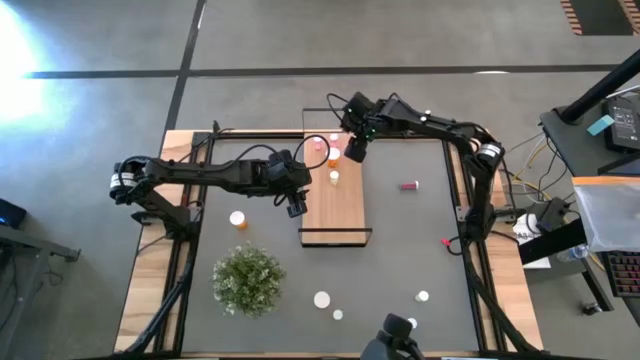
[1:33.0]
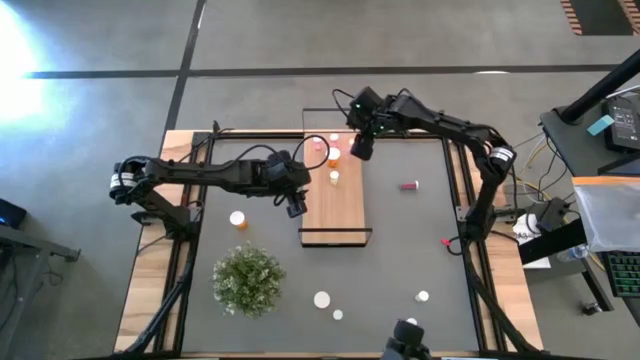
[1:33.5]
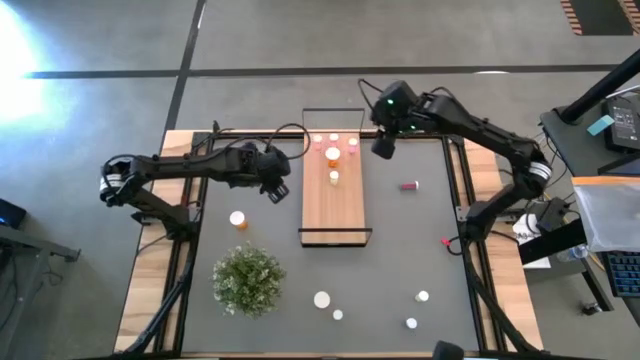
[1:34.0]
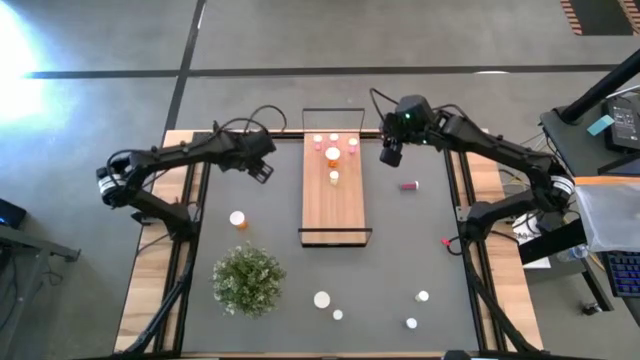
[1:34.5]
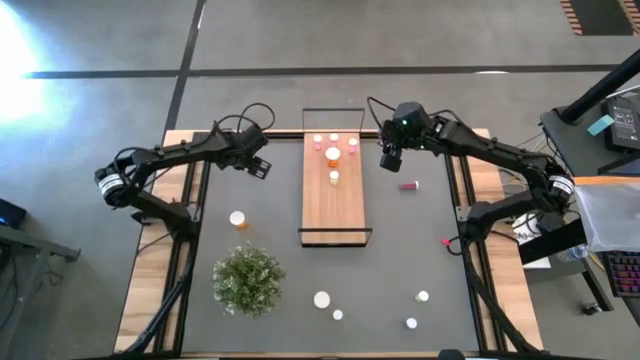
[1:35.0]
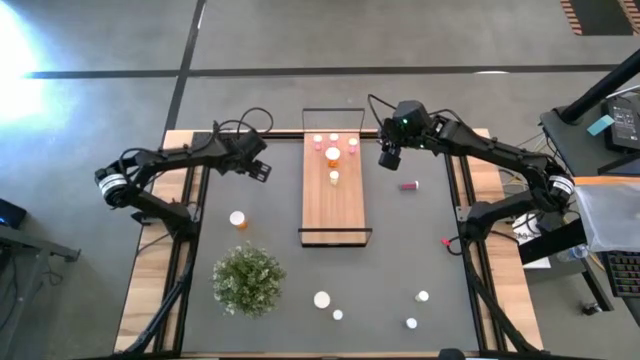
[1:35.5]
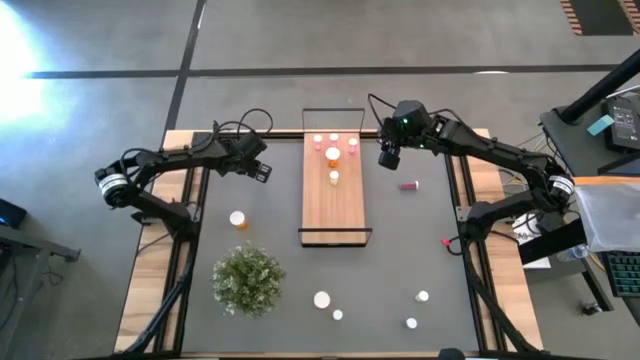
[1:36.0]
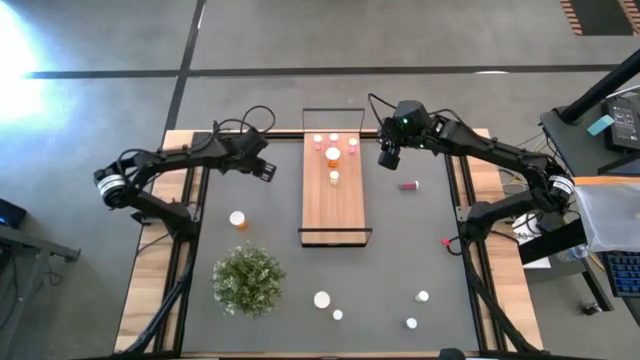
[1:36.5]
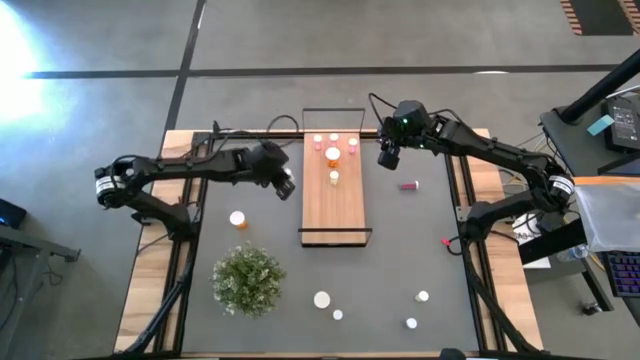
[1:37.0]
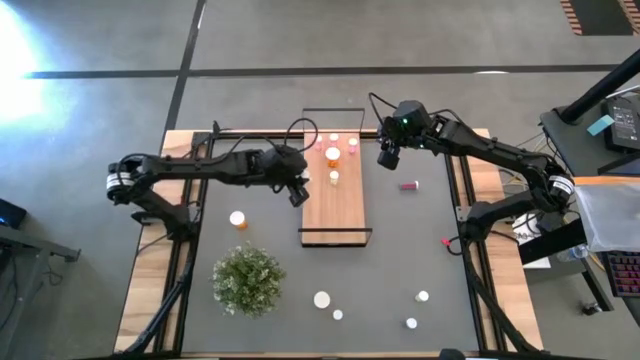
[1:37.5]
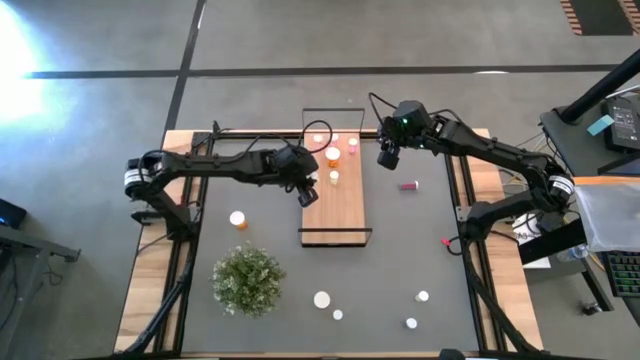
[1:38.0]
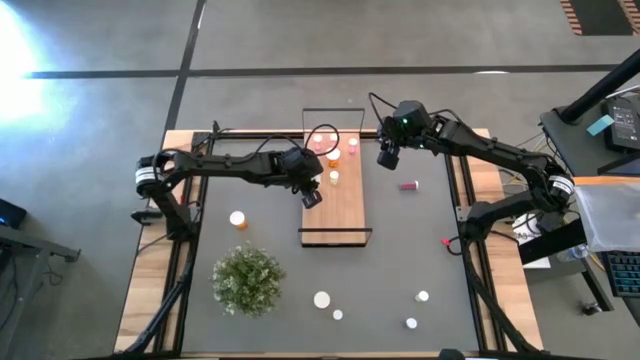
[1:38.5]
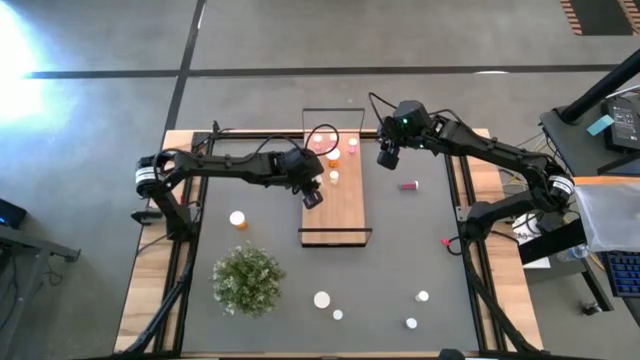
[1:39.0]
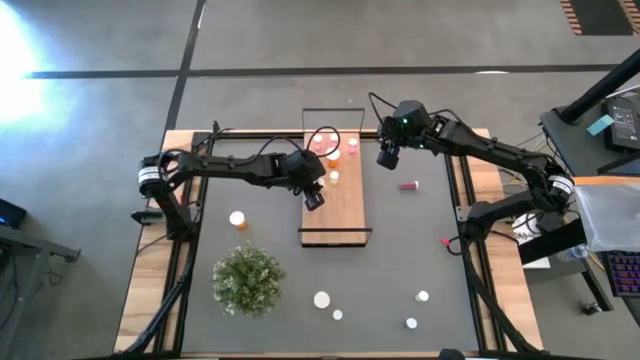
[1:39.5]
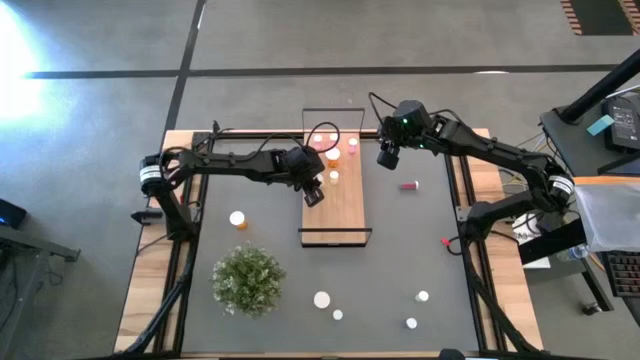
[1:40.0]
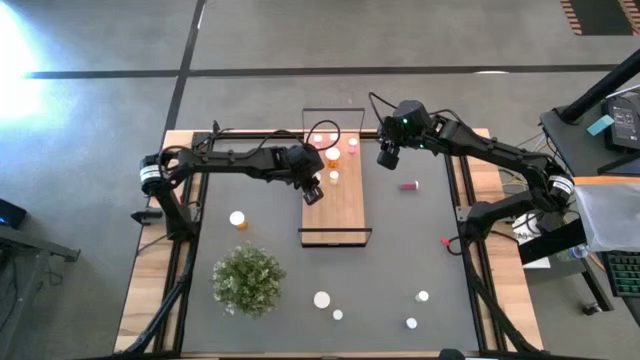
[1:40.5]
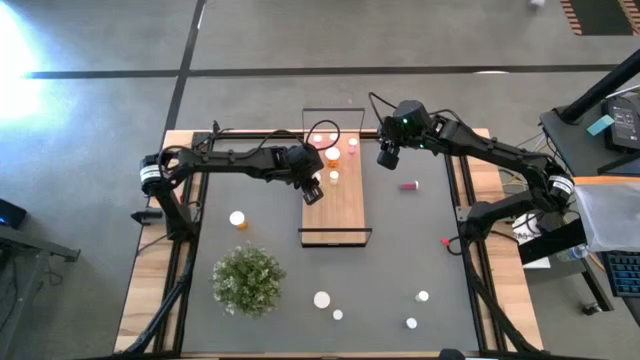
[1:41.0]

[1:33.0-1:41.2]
Task: Pick and place medicine bottles onto shelf by color
Put the top yellow pill bottle on the shelf aligned with the other yellow pill bottle

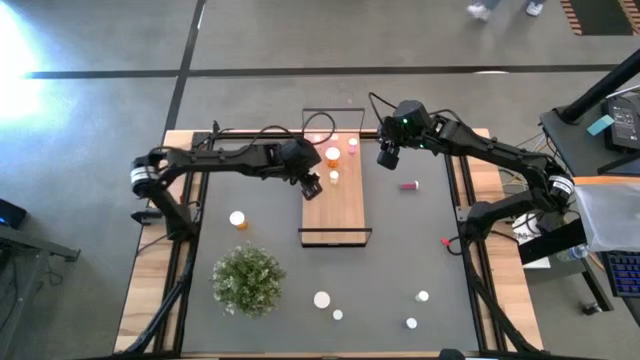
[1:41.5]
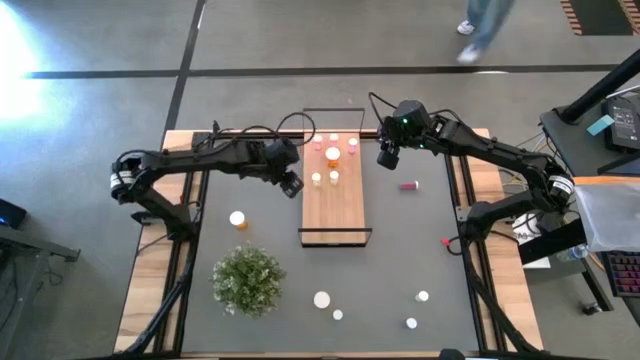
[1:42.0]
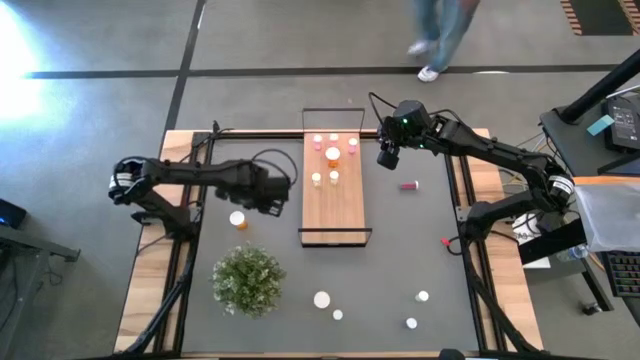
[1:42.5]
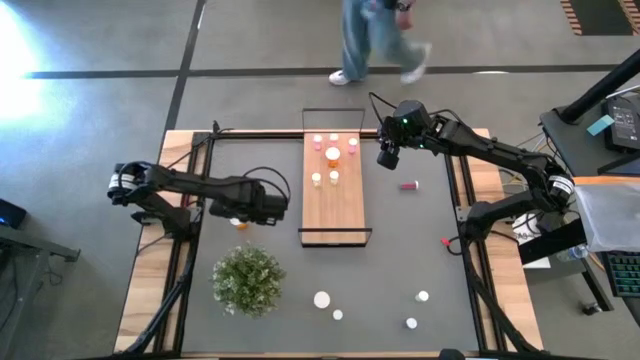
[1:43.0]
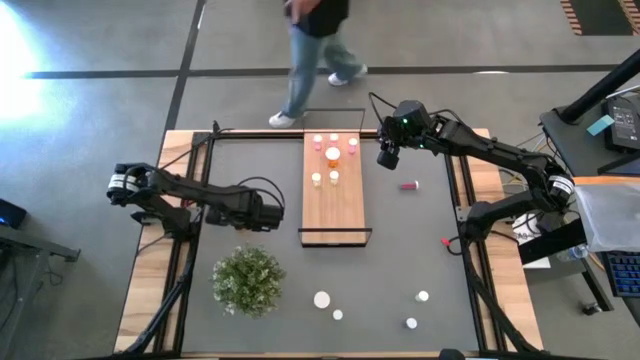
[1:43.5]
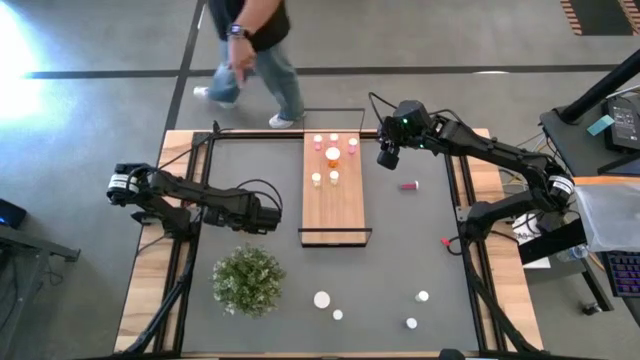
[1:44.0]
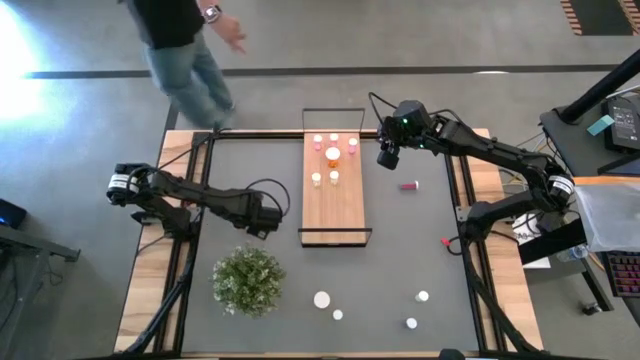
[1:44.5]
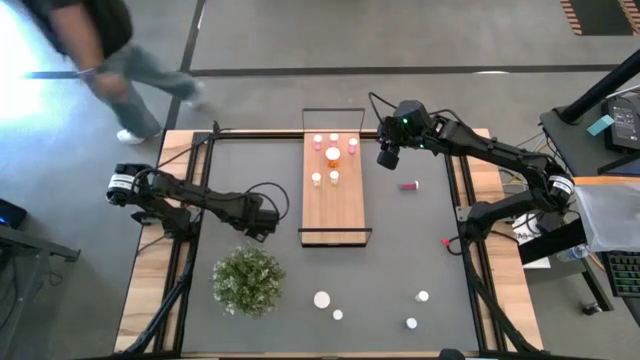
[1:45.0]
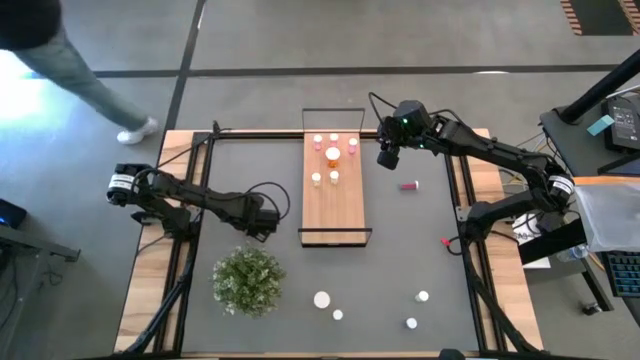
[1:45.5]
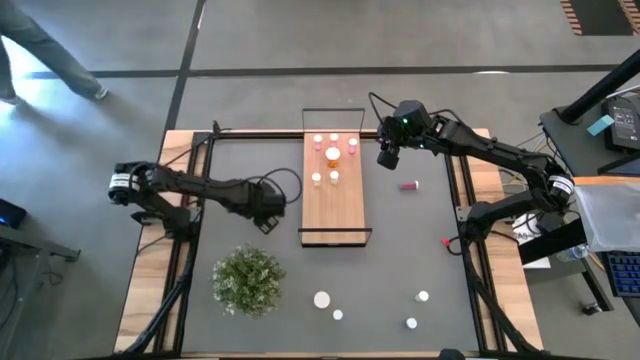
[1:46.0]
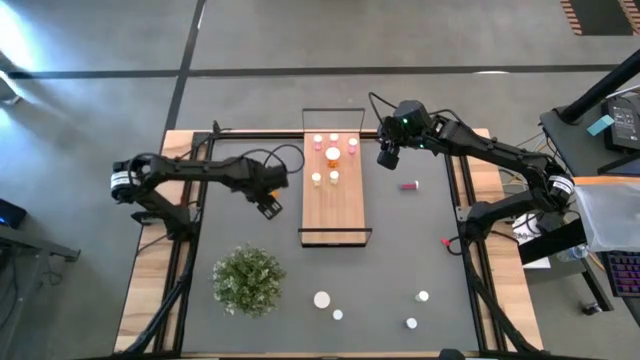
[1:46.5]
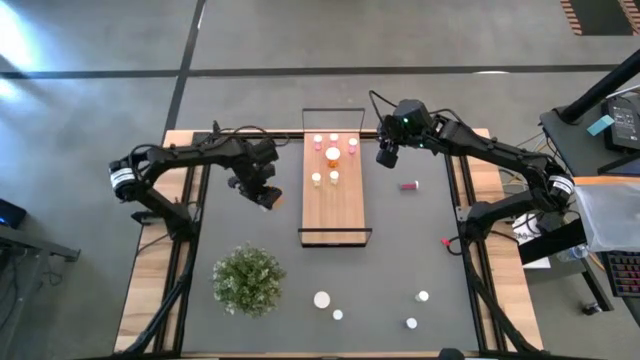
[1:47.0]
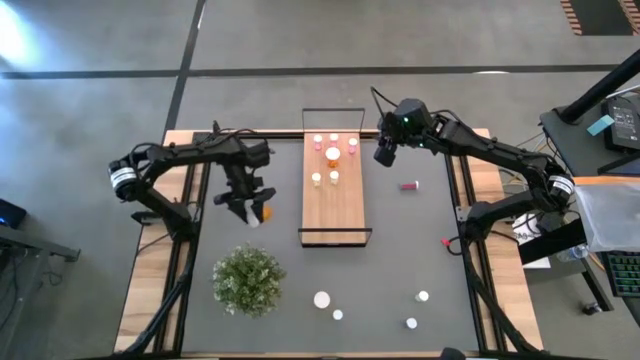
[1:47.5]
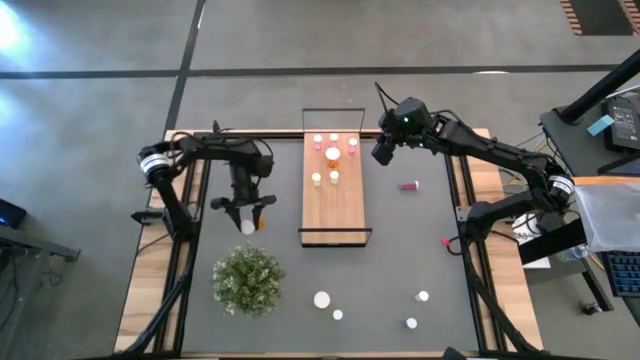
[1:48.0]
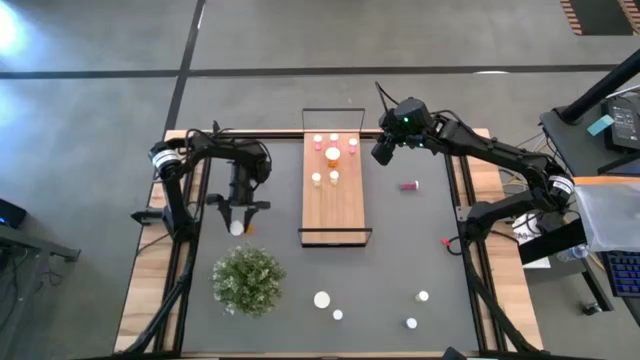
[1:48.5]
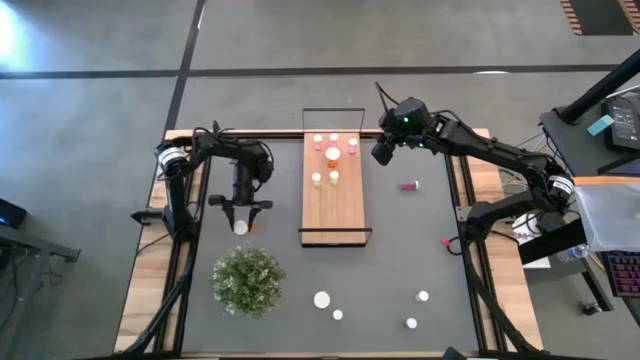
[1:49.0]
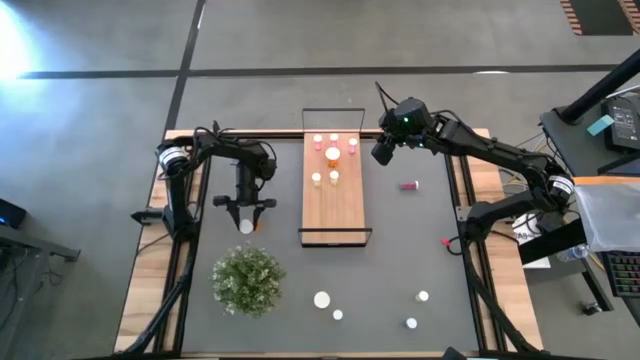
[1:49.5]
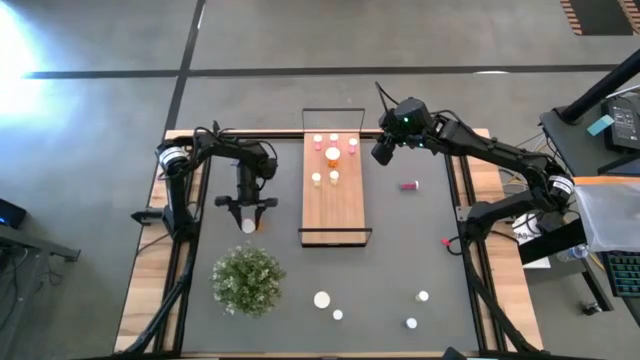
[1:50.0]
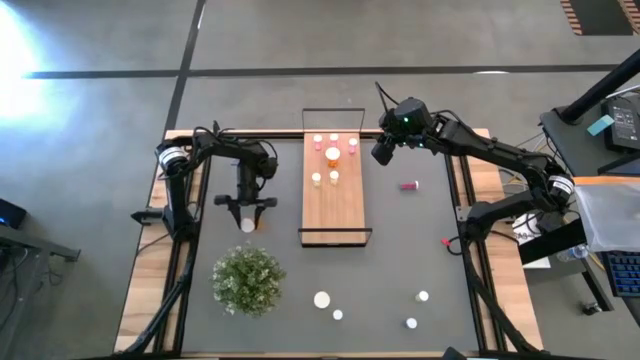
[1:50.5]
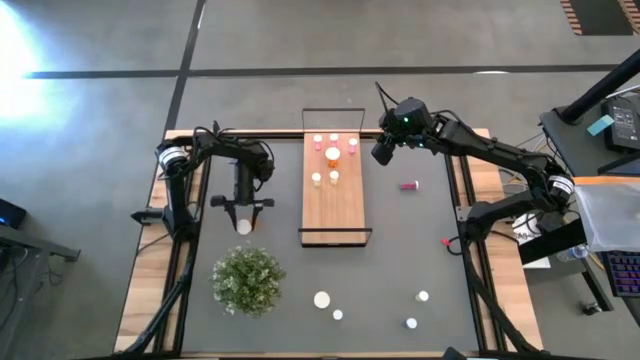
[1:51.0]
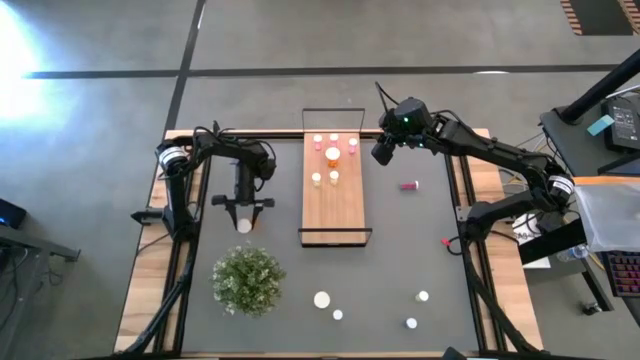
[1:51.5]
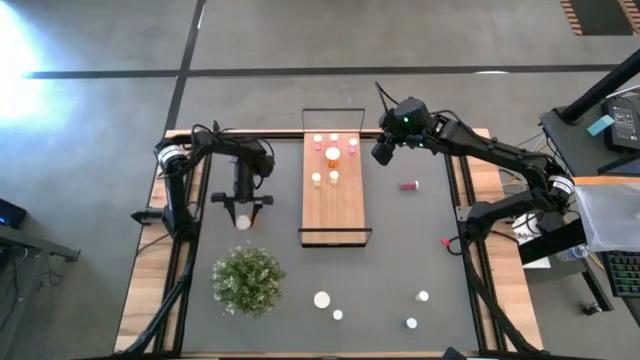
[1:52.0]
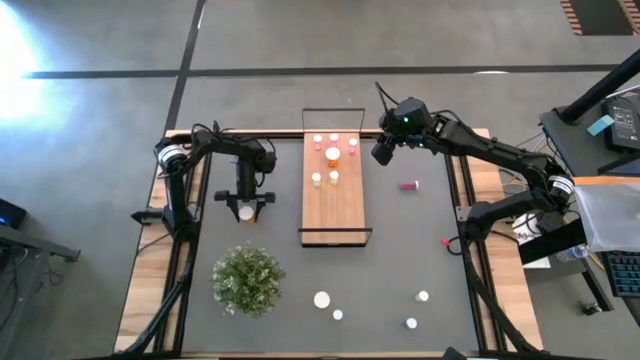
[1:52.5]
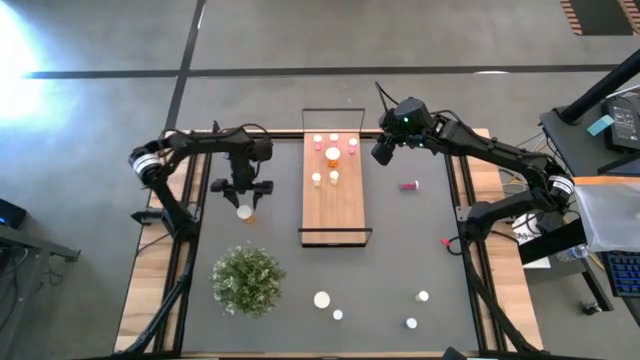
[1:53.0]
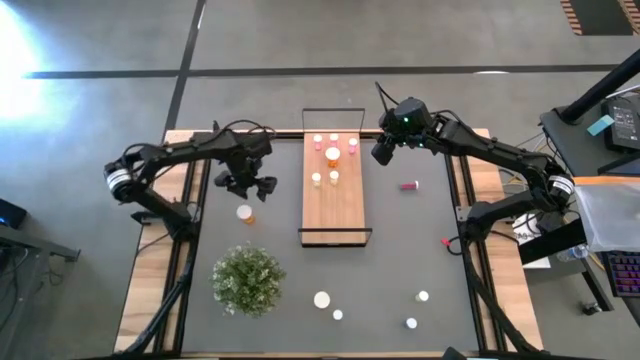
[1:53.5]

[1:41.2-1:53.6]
Put the top orange pill bottle on the shelf aligned with the other orange pill bottle
